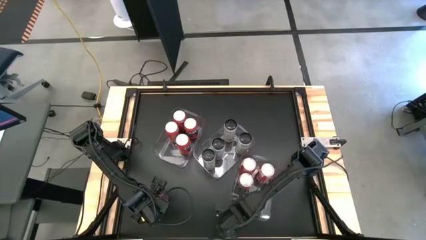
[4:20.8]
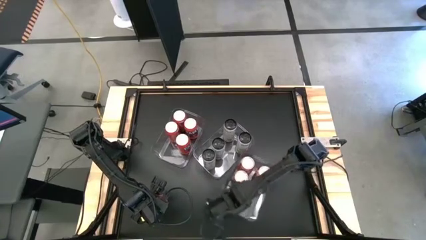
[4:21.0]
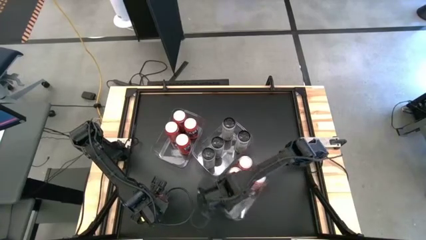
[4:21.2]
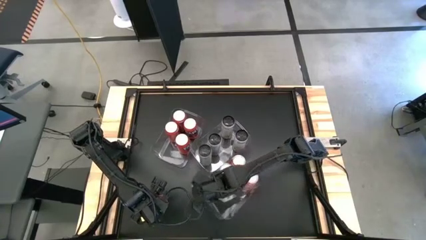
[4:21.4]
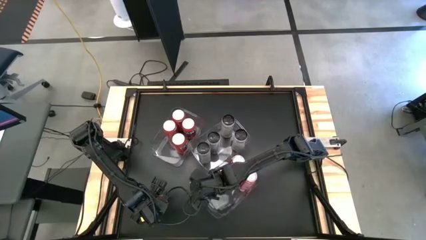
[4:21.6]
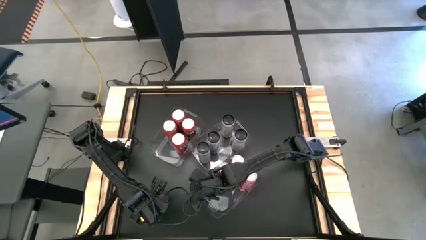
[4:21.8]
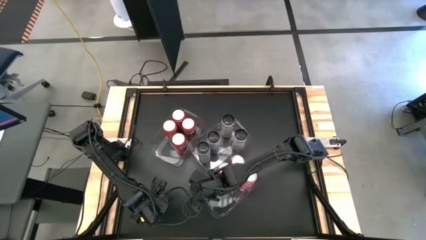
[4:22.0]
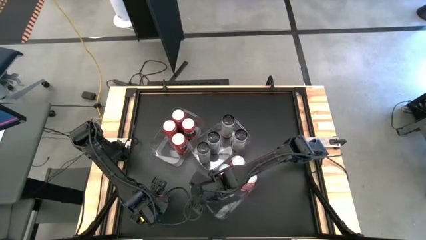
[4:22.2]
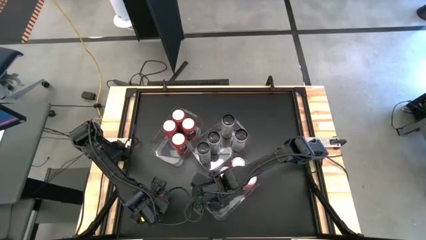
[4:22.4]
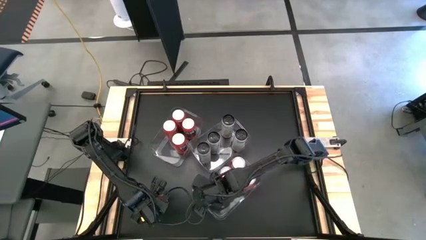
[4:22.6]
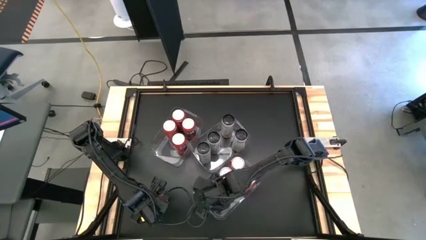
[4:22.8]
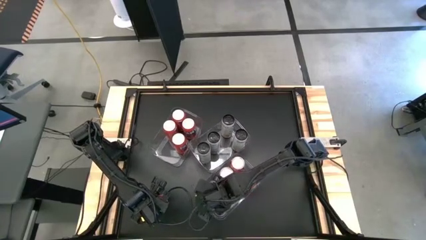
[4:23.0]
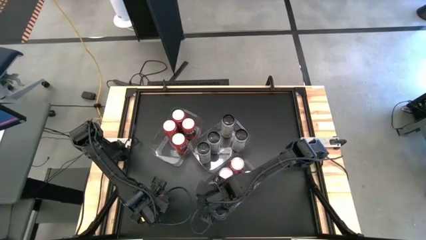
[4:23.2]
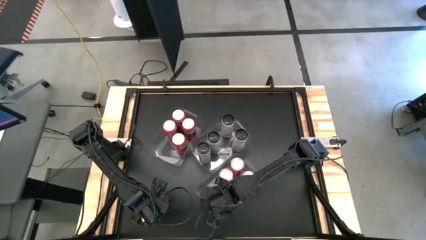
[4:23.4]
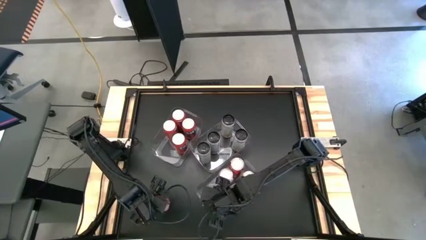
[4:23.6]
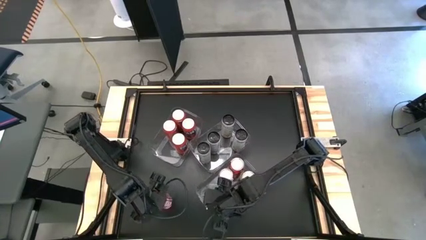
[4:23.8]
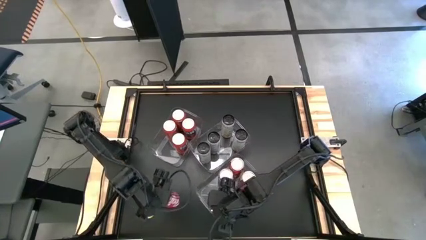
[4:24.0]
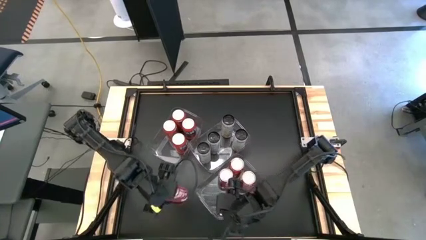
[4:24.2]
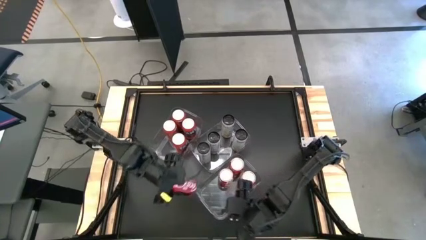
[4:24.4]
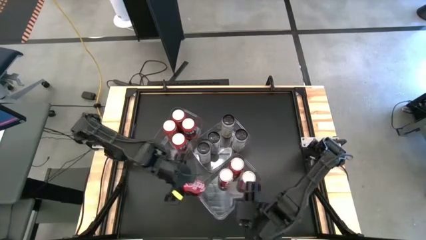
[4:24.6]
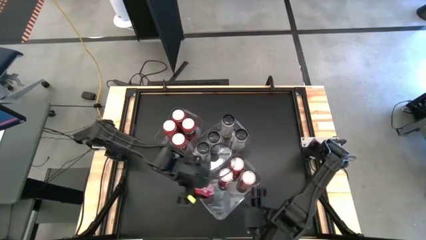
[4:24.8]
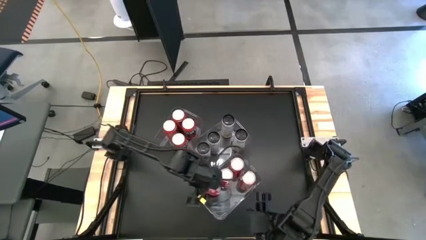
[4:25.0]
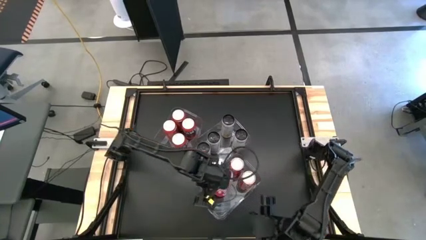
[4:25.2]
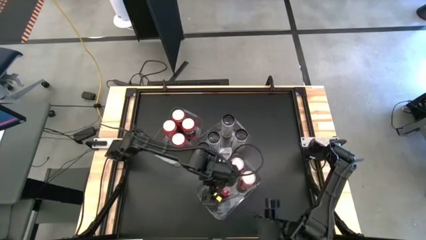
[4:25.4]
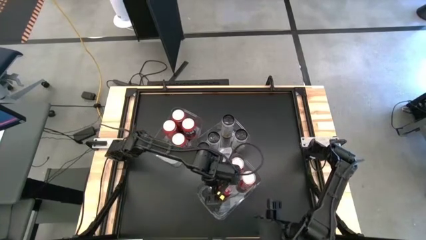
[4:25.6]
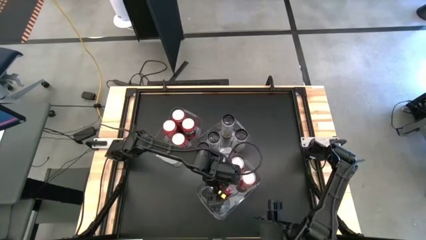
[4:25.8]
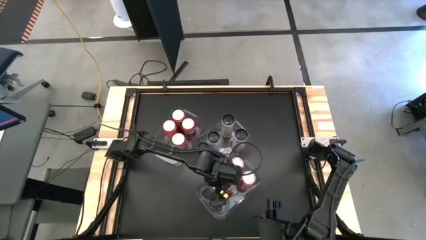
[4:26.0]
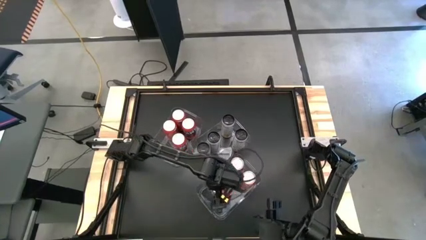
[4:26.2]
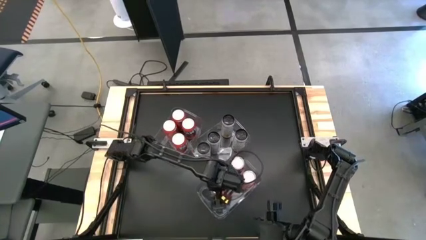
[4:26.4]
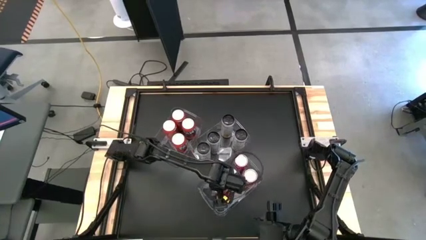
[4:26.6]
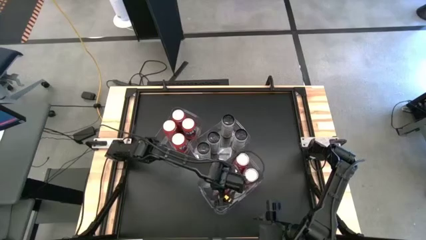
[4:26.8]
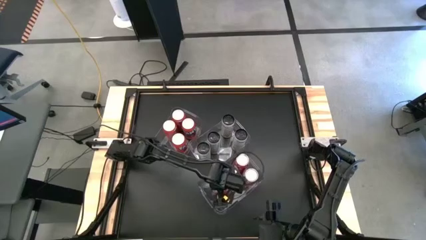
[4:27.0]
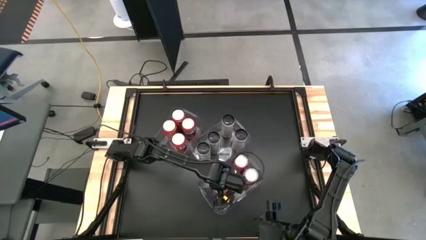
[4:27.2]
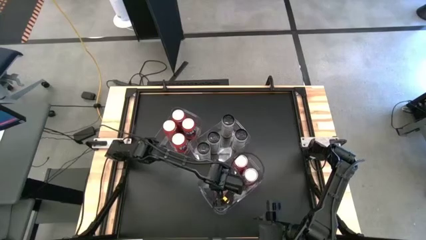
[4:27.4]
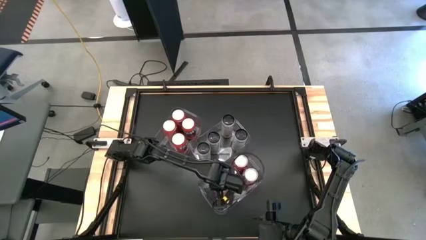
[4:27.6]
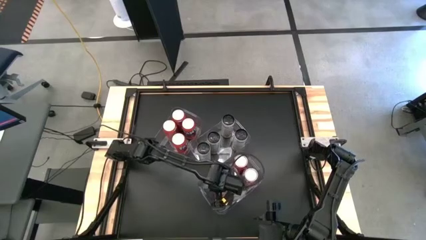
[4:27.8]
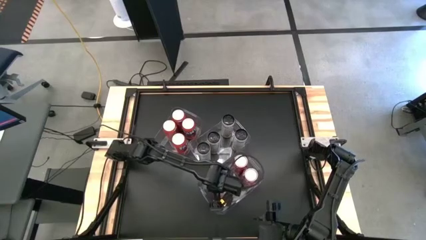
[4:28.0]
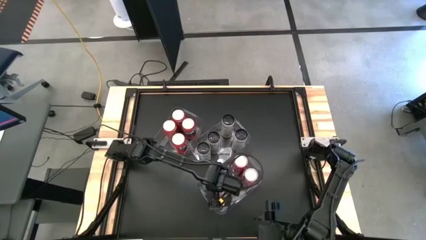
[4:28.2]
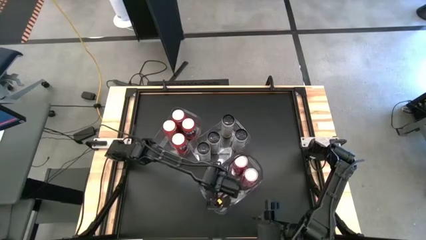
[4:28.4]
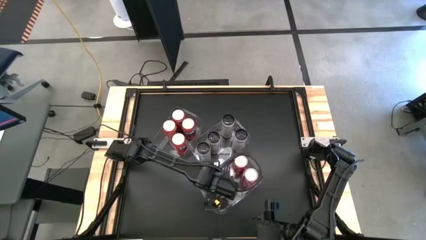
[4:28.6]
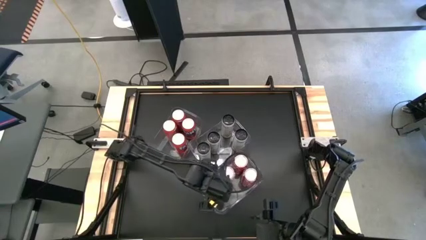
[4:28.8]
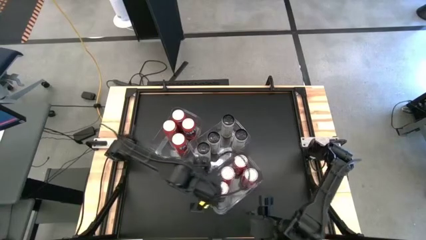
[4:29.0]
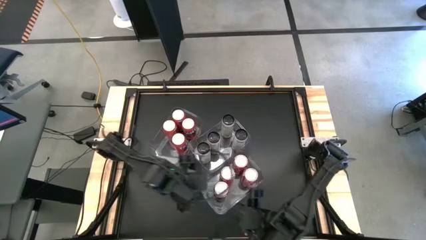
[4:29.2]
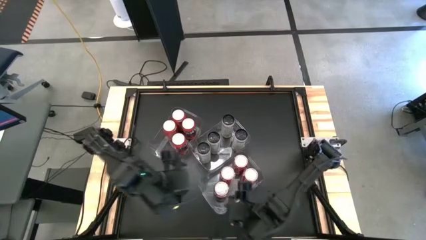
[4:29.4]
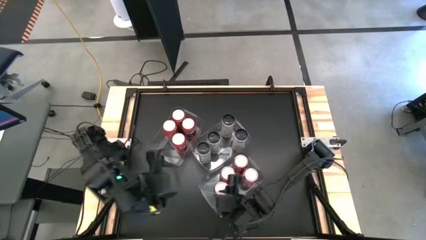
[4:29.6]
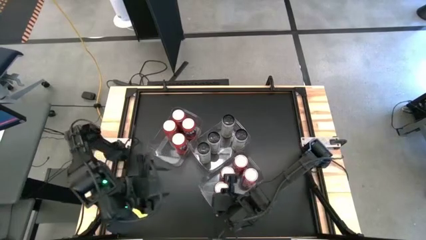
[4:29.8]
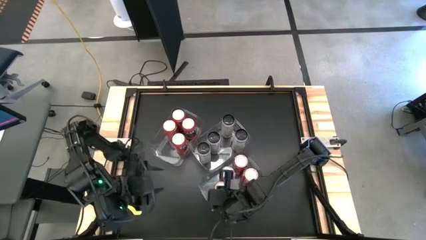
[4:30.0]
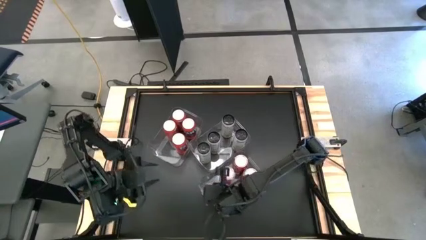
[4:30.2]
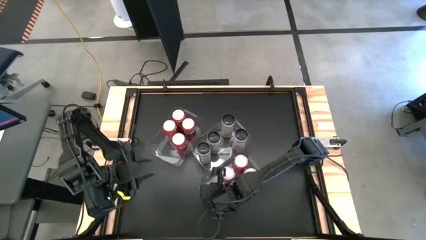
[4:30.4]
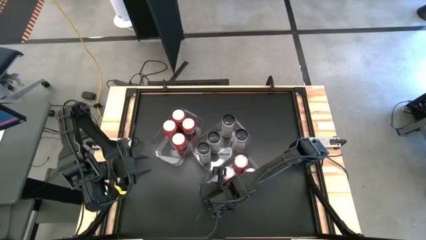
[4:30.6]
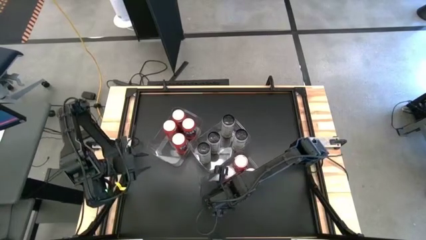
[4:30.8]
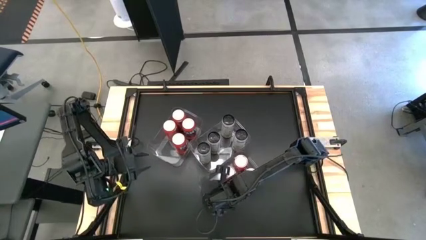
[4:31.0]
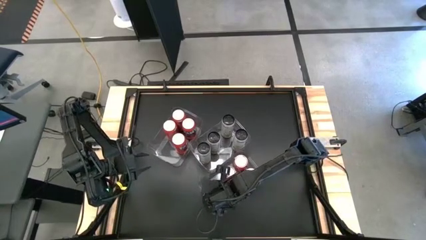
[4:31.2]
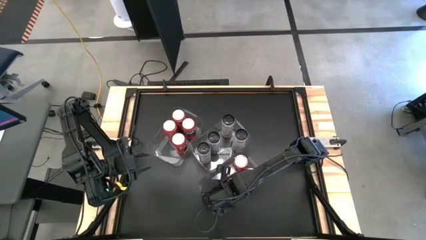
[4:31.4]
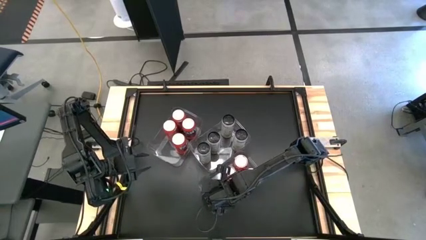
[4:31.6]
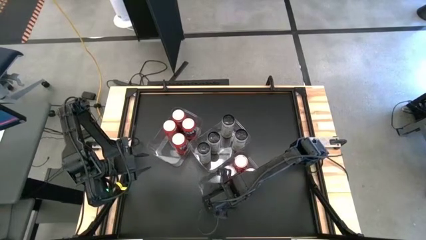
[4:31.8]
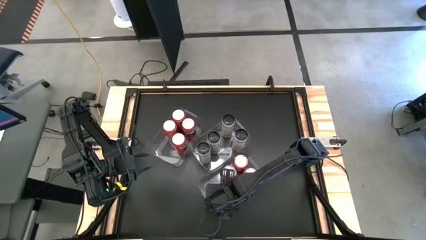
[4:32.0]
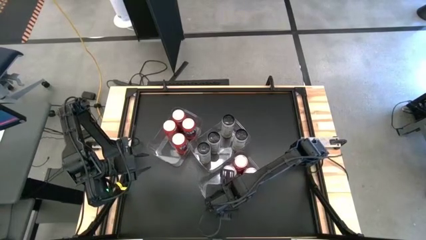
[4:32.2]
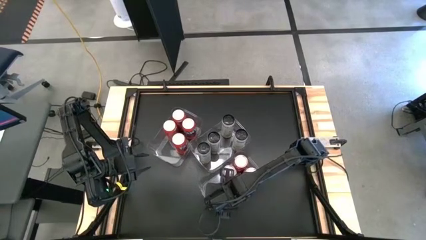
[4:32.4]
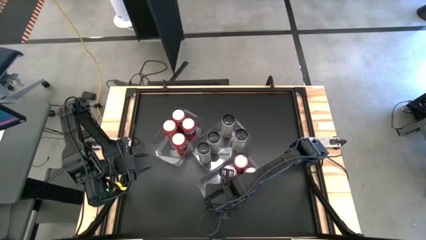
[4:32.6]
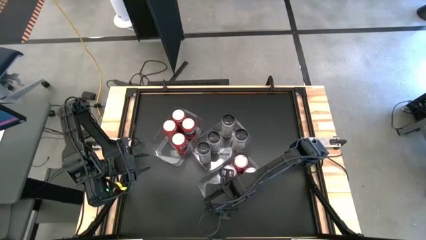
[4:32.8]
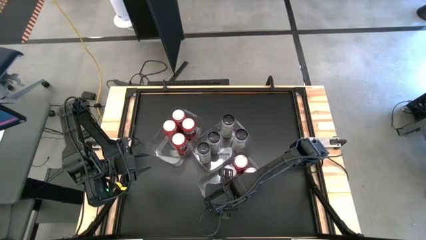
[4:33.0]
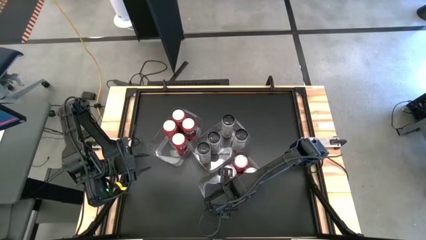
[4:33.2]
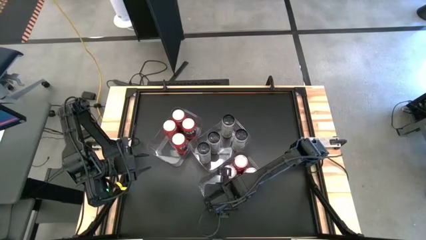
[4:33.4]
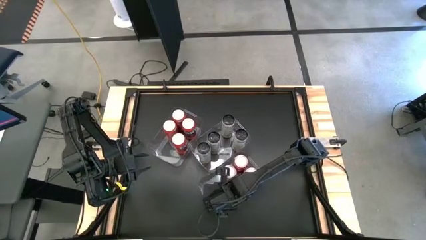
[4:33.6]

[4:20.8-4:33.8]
Task: Sort soda cans
Put the red soda can into the right transparent bin

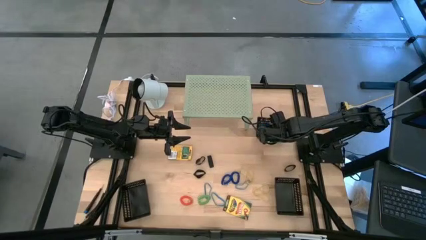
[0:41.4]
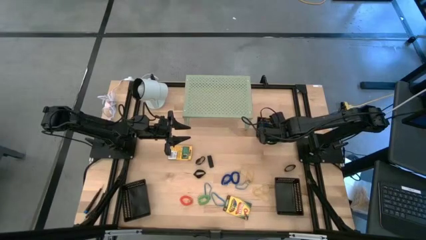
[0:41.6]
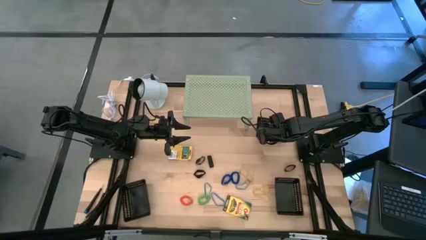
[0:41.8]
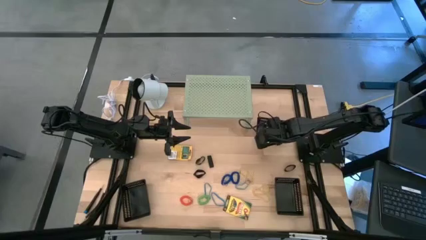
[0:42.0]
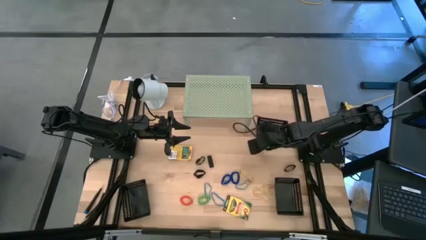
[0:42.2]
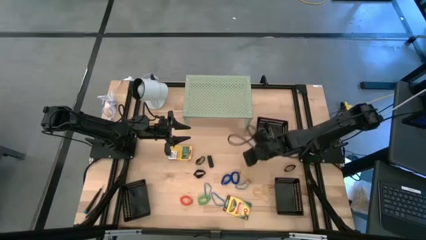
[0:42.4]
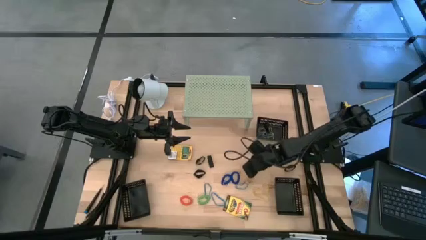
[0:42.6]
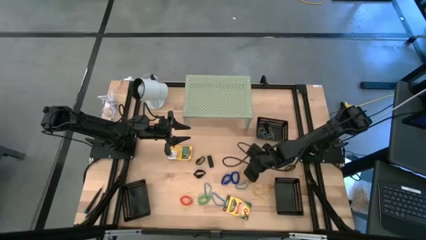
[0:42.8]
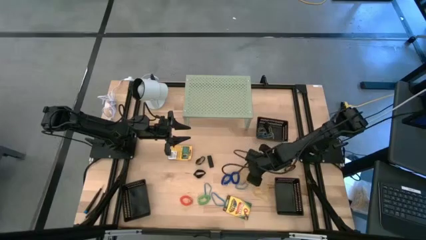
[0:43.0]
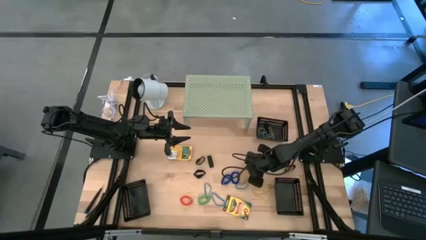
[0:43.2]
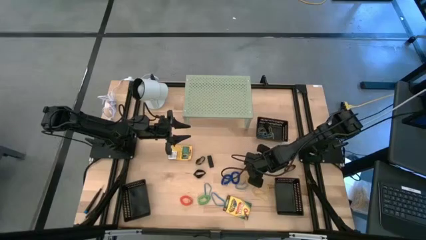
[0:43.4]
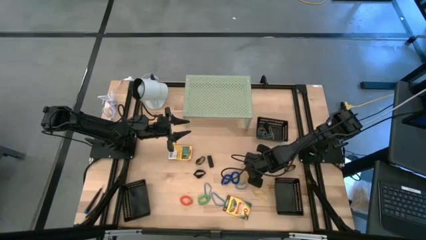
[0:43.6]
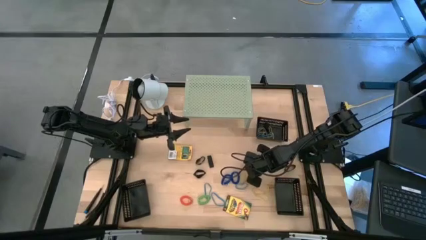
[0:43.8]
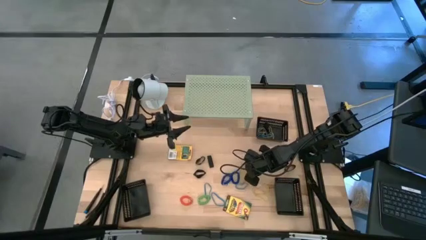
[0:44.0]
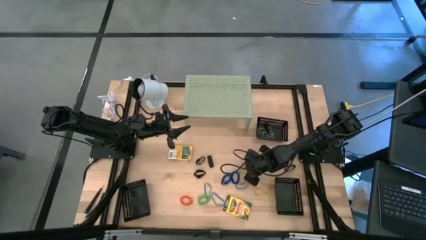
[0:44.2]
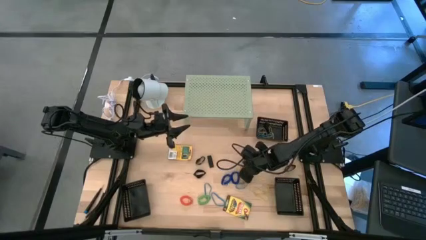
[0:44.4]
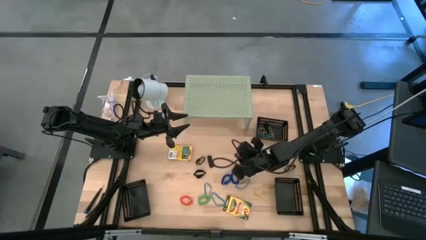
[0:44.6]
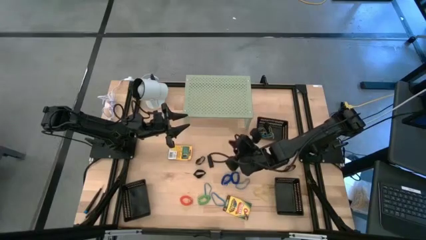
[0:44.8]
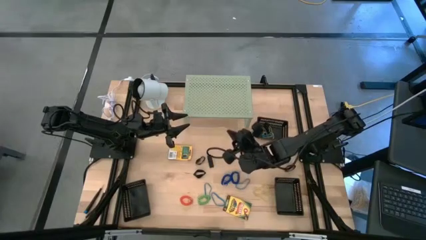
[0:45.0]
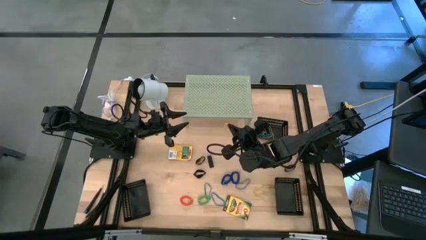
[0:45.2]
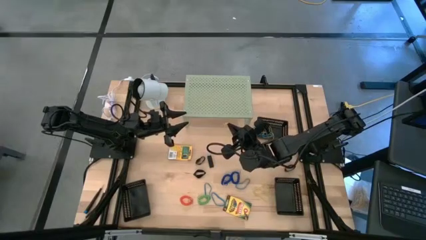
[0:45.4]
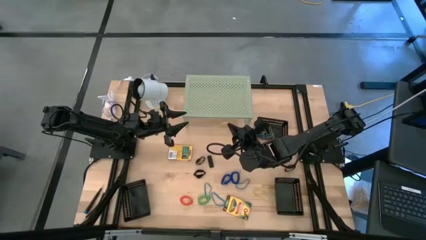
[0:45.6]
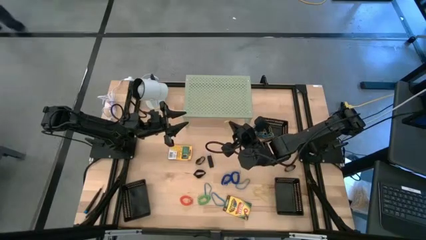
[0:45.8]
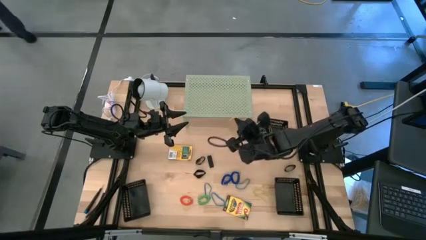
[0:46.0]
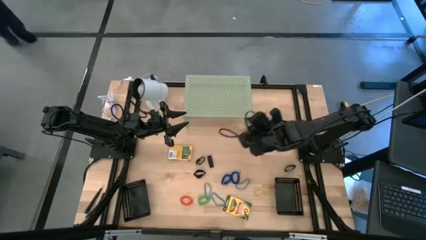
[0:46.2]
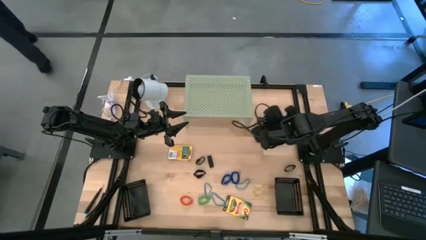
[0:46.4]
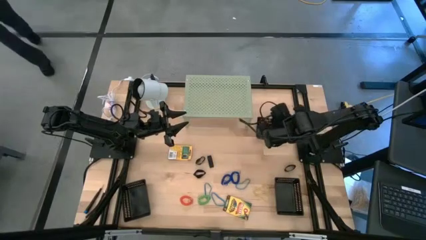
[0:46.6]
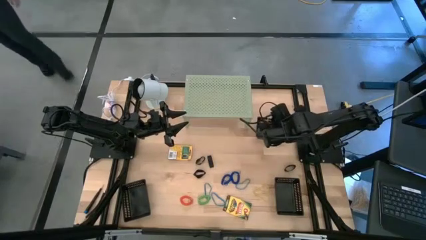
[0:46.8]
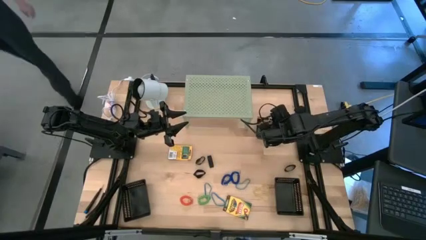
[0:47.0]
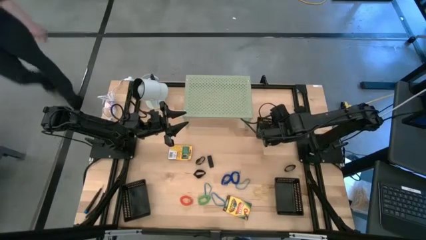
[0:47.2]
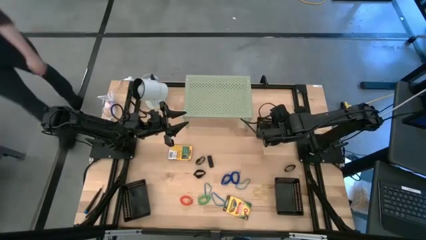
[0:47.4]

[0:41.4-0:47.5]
Task: Pick & Place Office Desk Supplies
Put the yellow rubber band into the top right black bin
